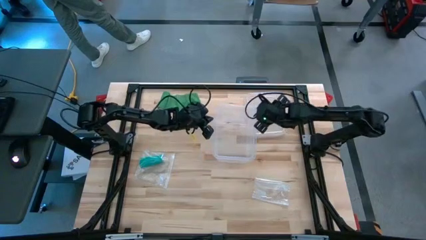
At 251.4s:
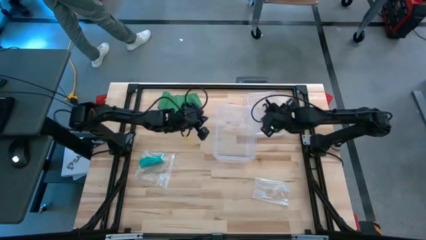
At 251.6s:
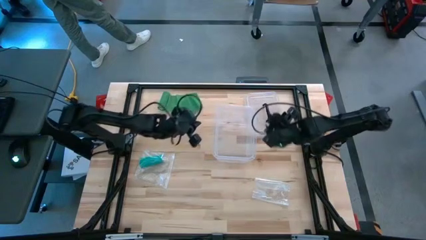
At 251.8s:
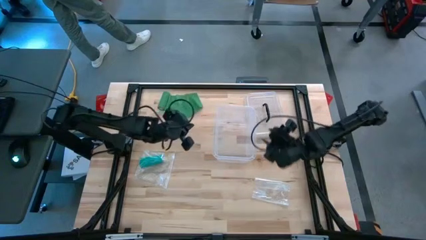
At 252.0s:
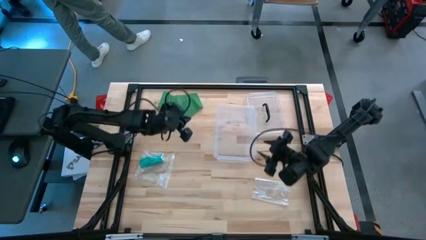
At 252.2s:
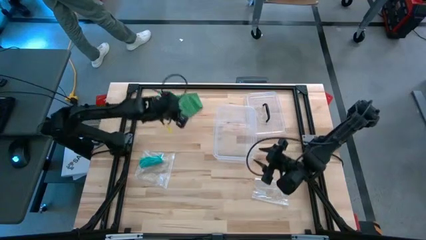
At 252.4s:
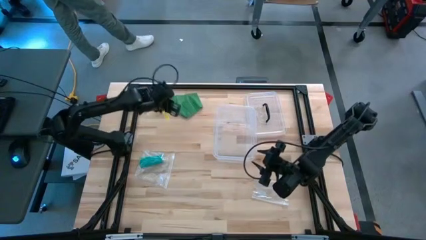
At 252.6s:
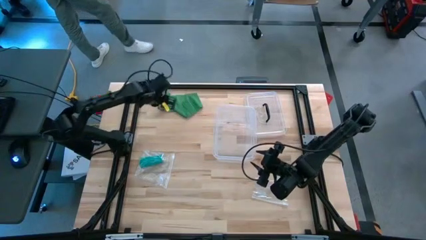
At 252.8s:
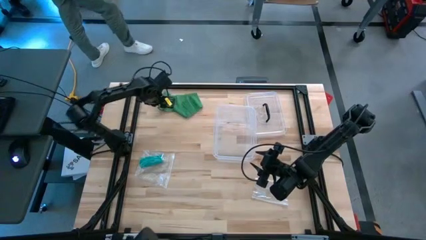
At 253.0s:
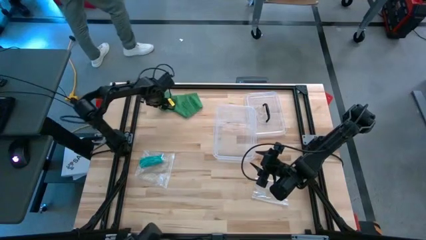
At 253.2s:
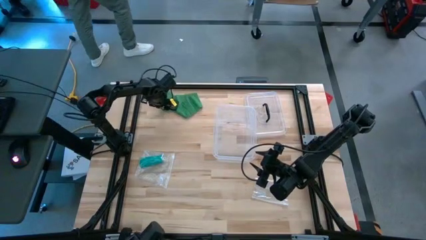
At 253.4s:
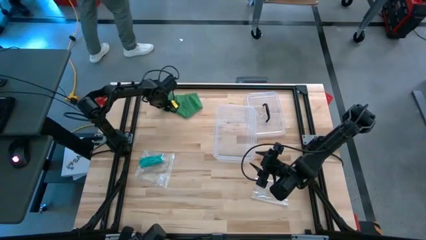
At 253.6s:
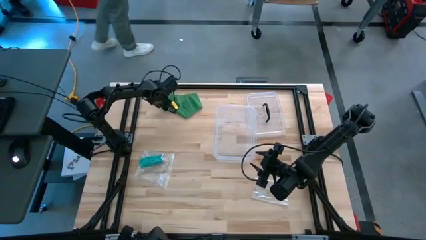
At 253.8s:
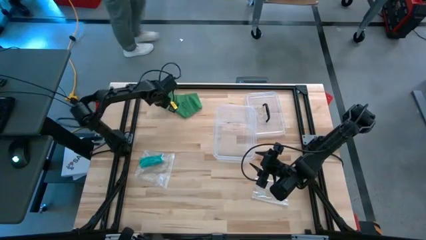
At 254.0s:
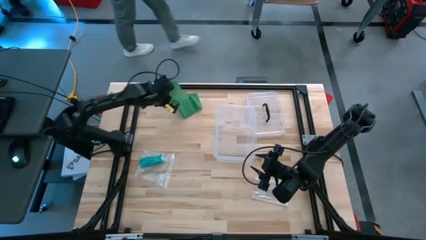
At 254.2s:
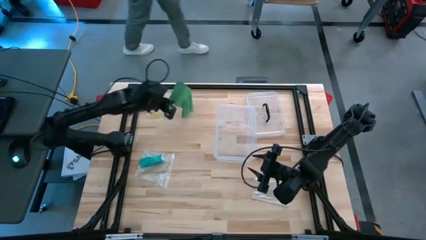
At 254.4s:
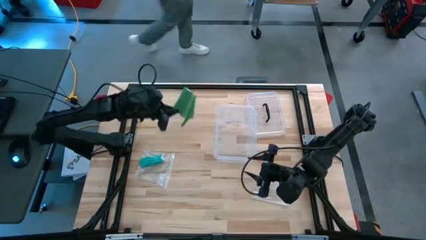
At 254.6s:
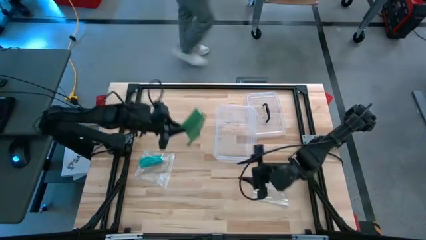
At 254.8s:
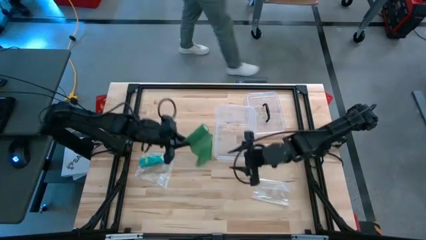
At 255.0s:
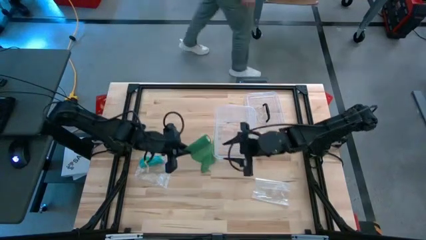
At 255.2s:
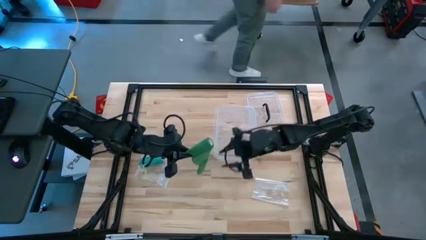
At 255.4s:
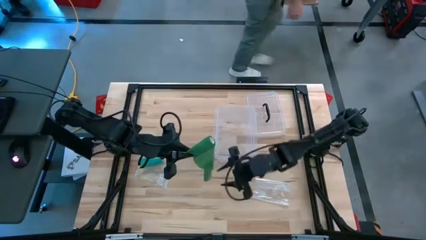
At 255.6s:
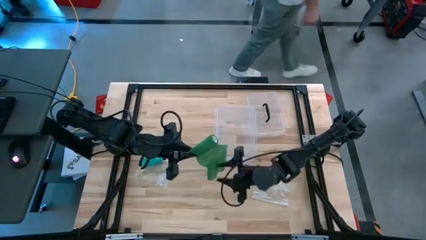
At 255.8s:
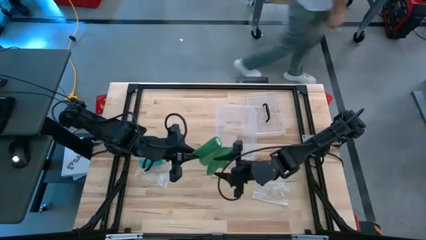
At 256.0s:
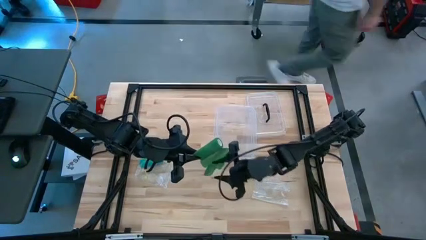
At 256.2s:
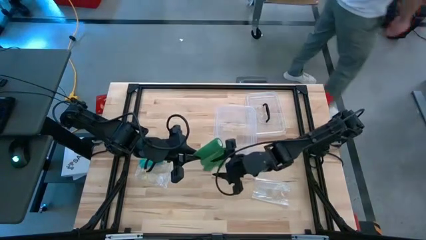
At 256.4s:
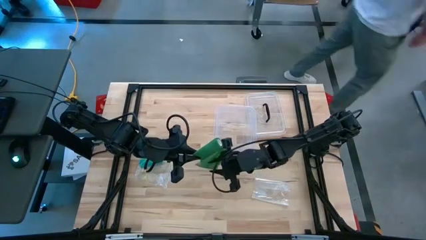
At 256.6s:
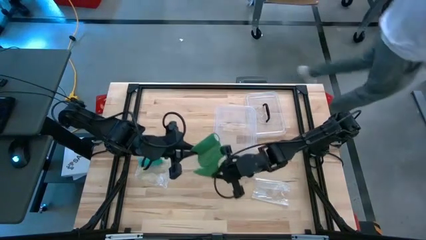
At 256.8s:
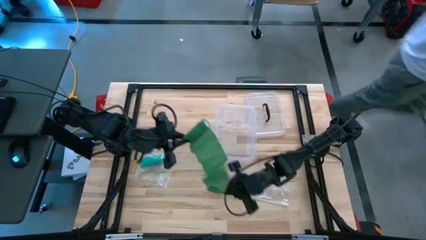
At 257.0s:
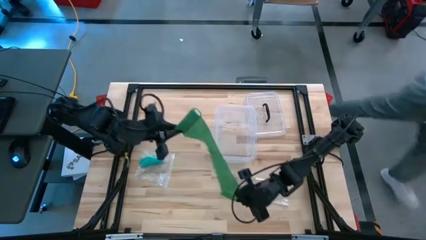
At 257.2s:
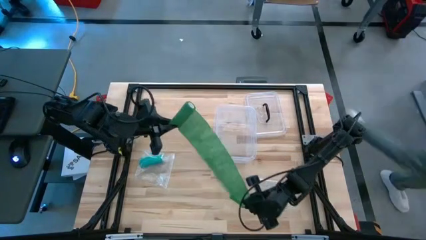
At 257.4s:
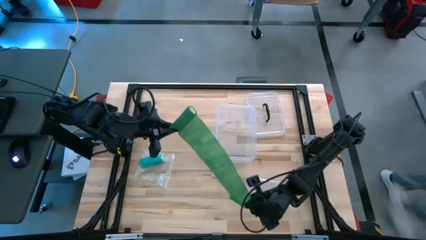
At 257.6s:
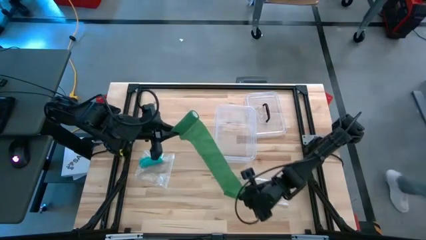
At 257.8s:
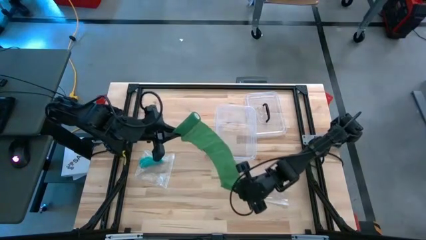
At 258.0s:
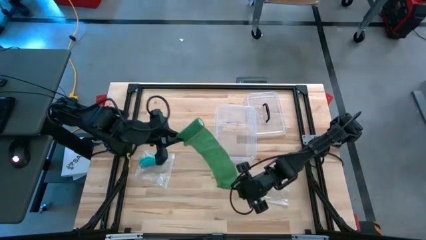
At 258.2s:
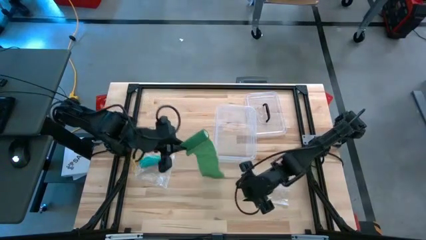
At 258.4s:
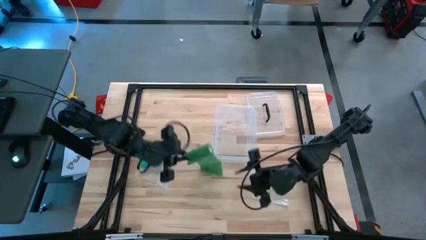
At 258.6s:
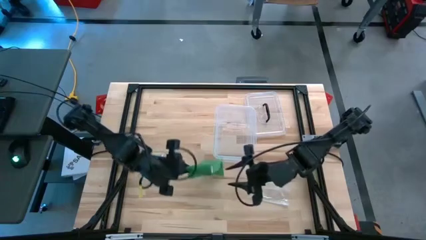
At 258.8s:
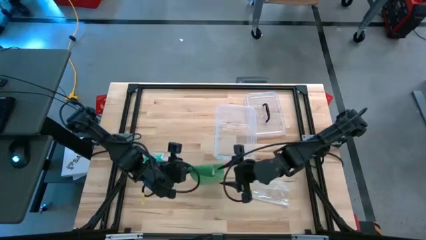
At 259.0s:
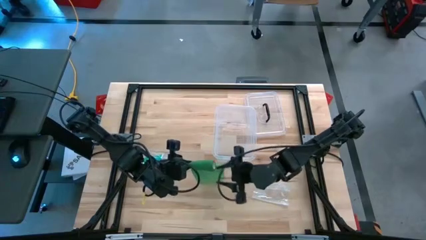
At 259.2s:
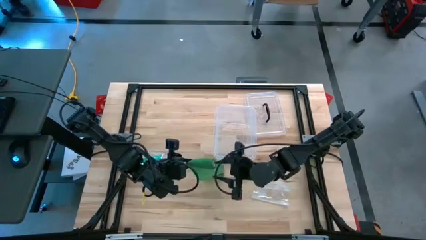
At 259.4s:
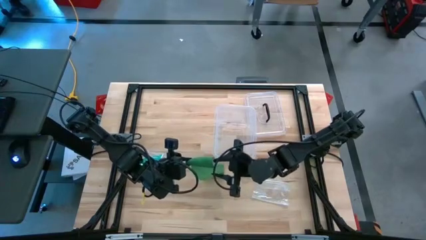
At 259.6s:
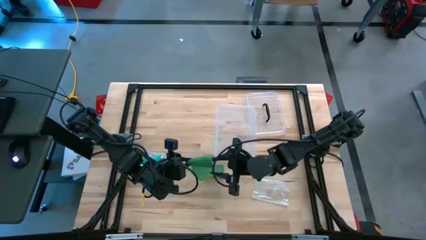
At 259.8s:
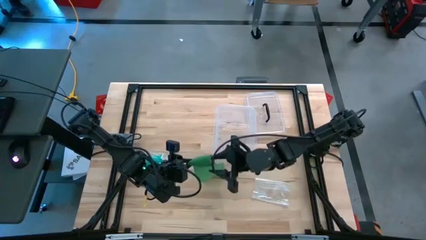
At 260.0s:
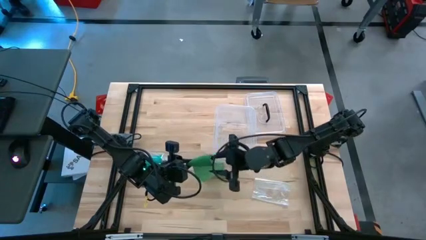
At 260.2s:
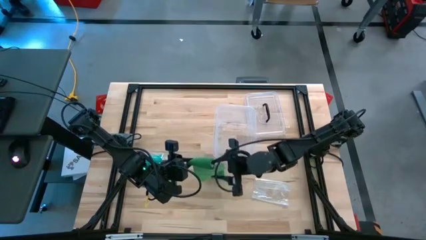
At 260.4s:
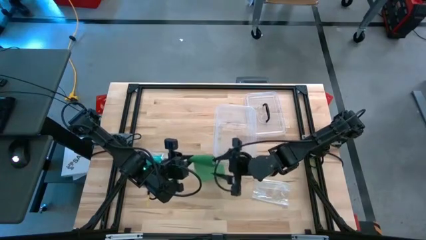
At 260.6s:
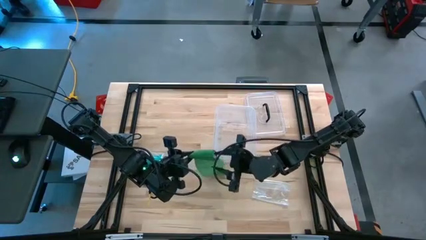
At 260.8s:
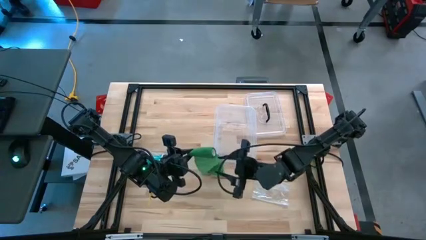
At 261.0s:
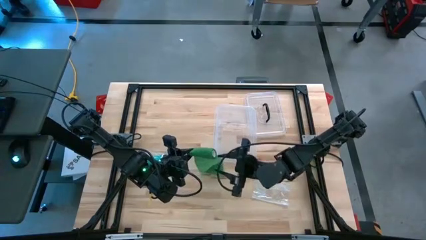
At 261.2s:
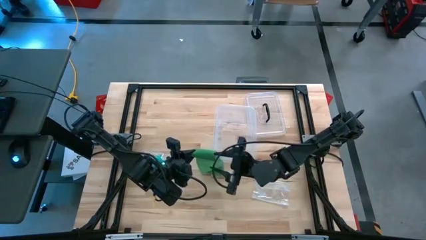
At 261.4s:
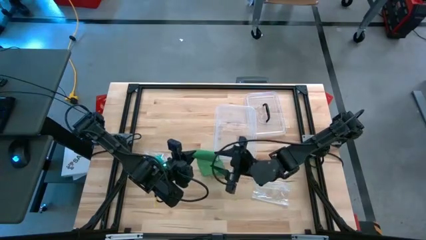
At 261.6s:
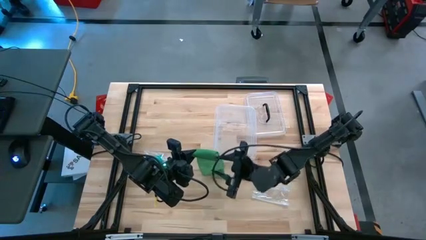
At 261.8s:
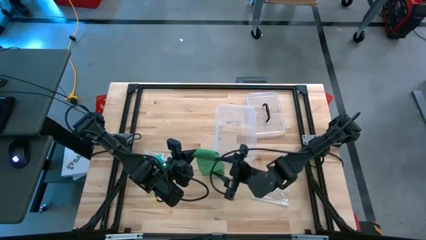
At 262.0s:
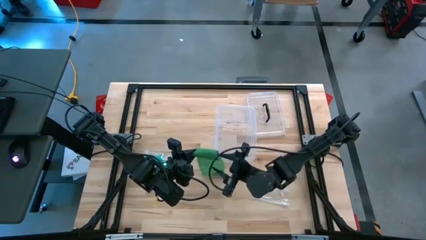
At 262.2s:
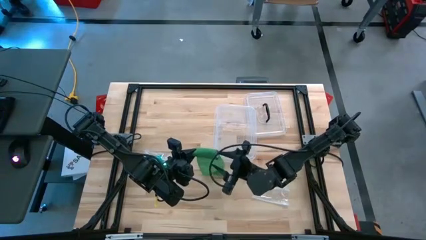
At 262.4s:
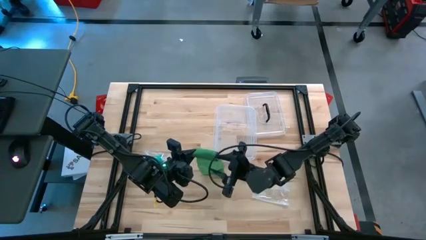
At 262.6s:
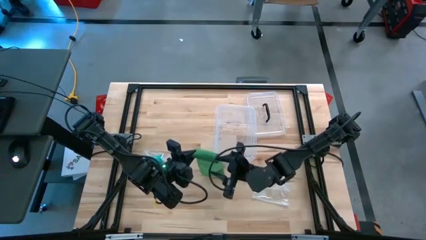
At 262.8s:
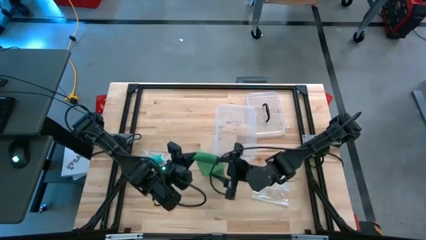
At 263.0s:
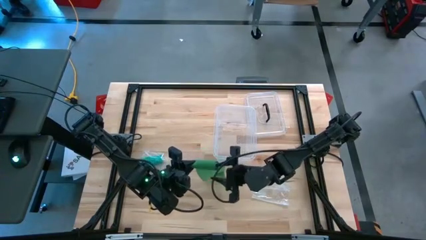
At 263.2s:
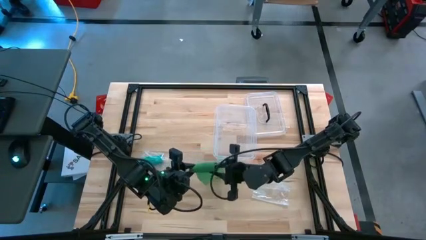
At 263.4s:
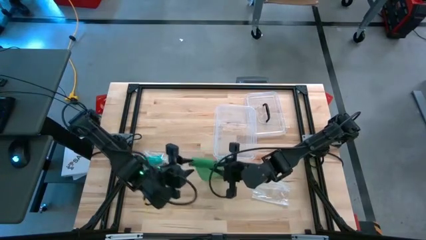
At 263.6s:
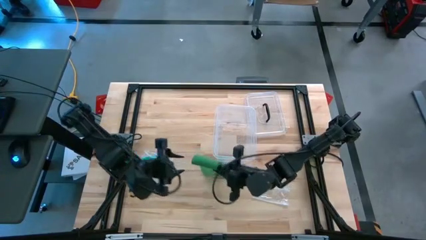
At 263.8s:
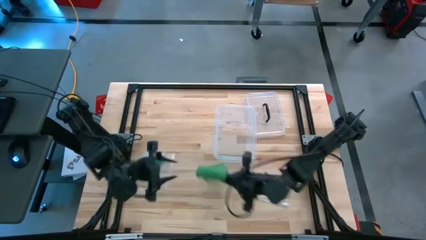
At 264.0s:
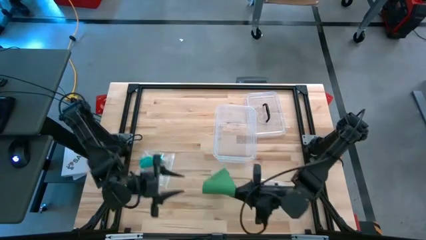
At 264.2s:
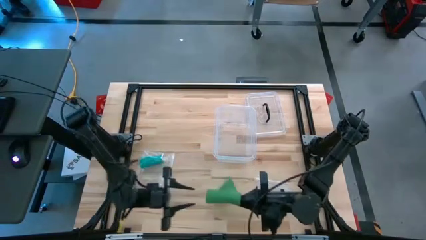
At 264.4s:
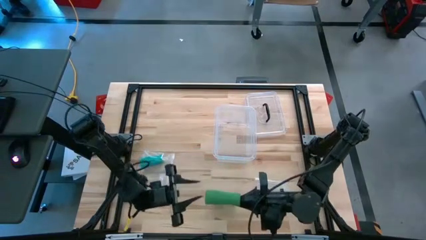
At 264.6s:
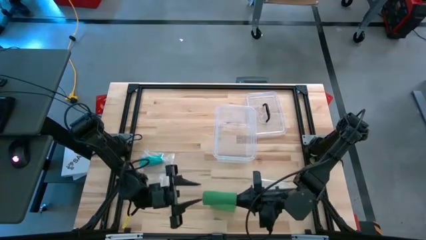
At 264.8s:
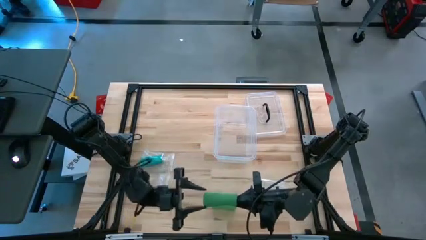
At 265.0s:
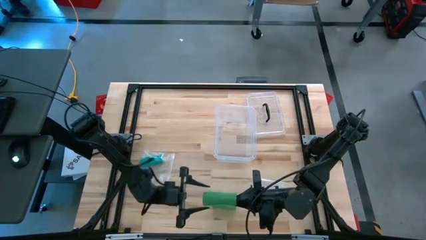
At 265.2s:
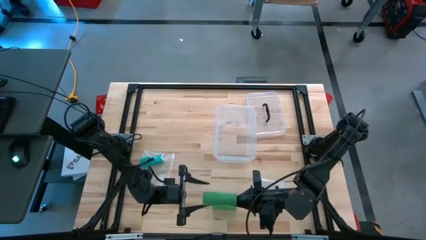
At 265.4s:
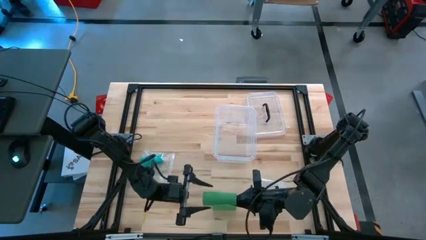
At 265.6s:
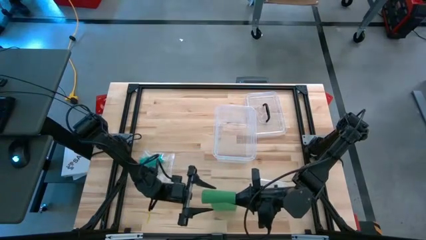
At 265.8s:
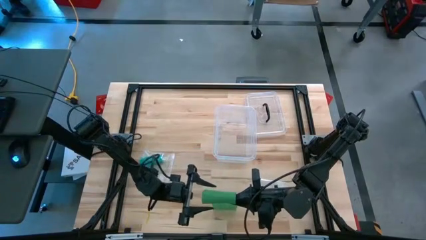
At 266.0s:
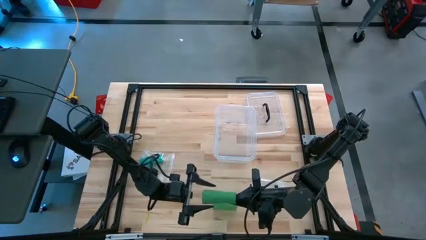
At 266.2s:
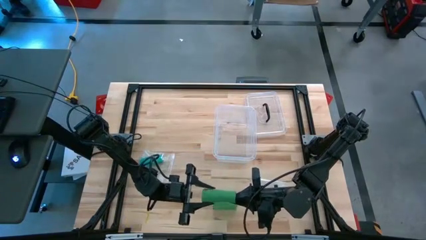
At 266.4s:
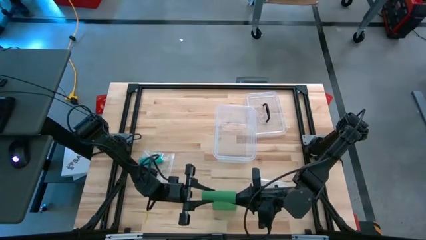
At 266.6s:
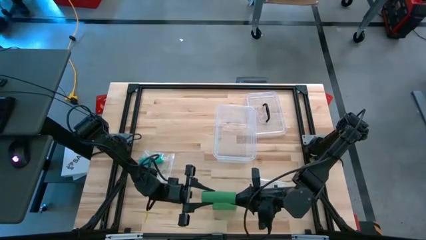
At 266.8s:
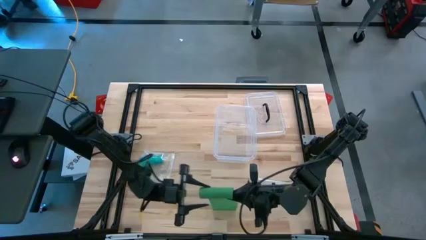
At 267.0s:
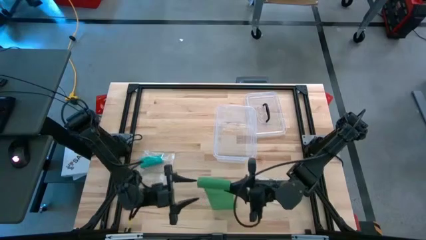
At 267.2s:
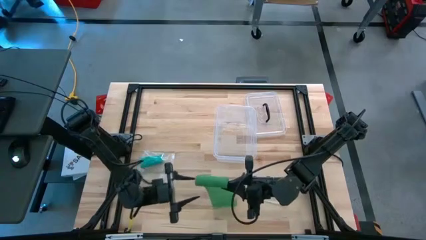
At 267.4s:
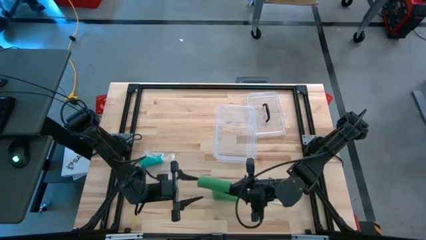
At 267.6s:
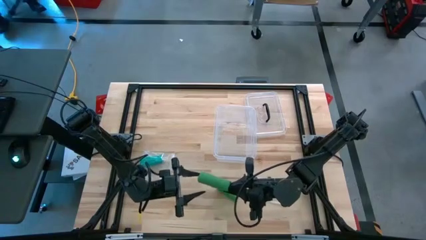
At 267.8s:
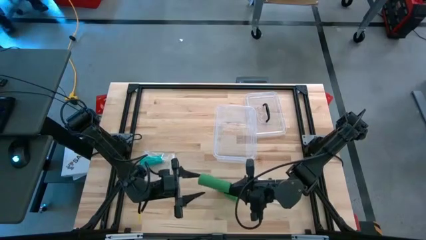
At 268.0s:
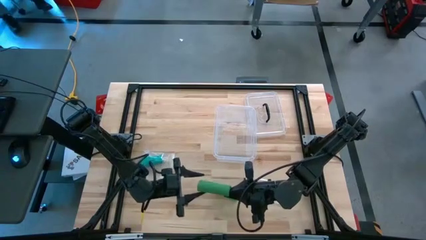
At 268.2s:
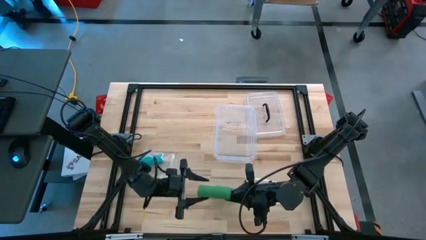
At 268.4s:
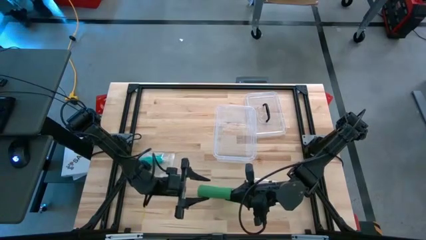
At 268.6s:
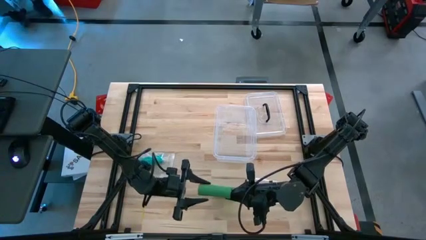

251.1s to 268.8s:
Task: Roll bandage
Roll the green bandage
